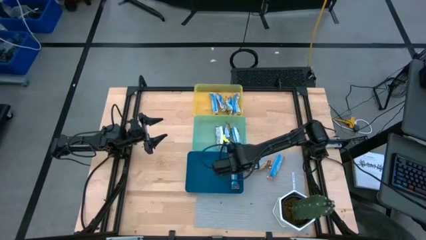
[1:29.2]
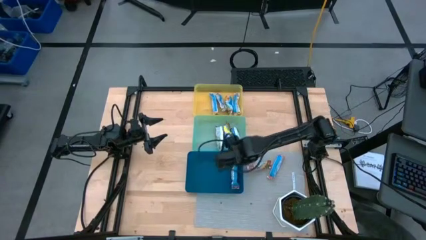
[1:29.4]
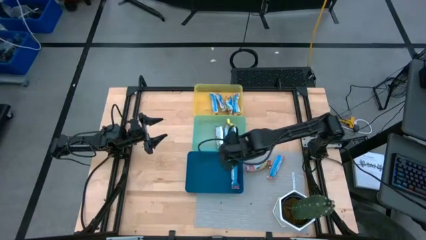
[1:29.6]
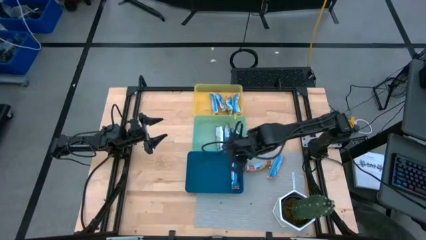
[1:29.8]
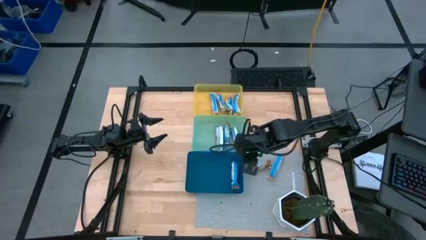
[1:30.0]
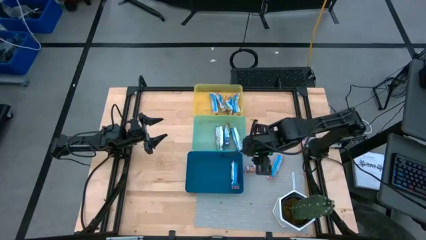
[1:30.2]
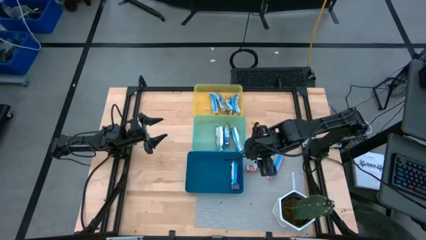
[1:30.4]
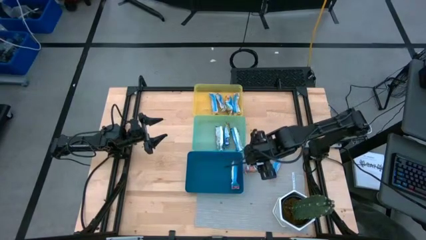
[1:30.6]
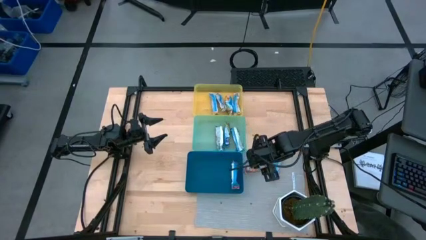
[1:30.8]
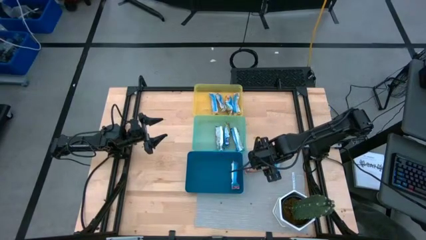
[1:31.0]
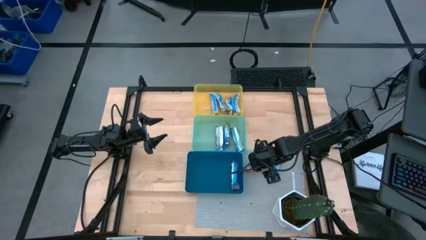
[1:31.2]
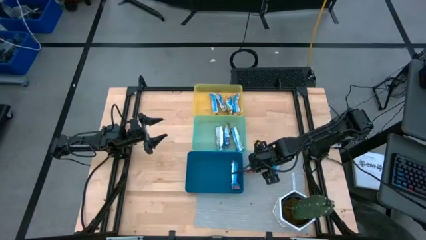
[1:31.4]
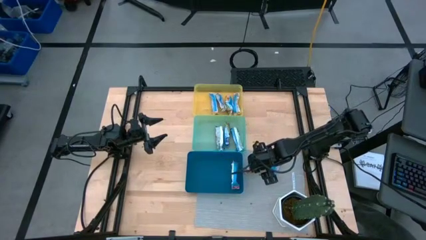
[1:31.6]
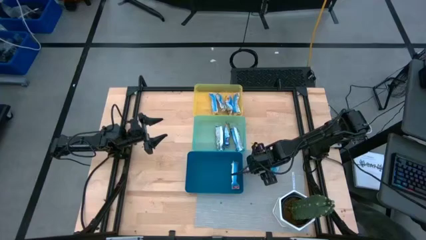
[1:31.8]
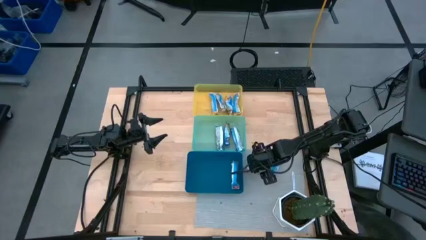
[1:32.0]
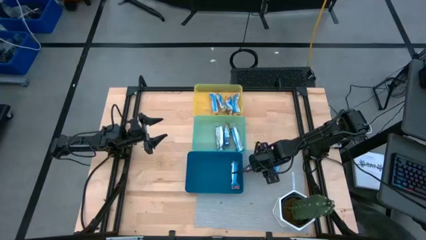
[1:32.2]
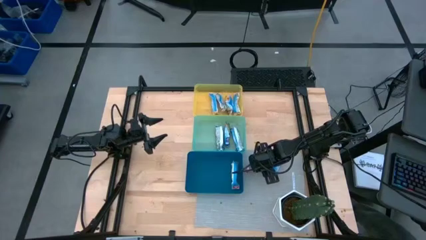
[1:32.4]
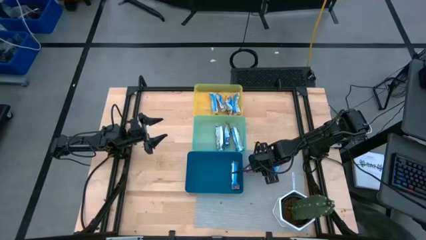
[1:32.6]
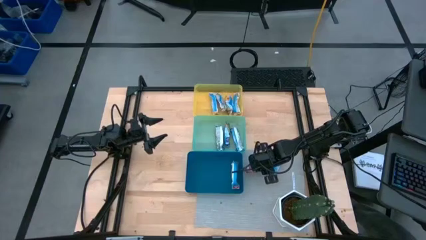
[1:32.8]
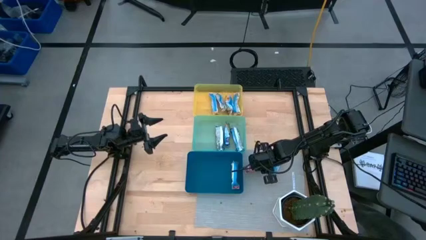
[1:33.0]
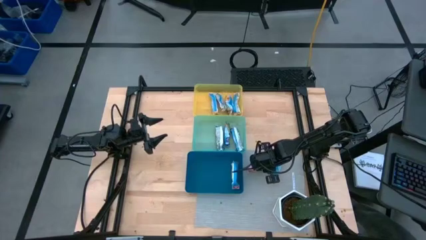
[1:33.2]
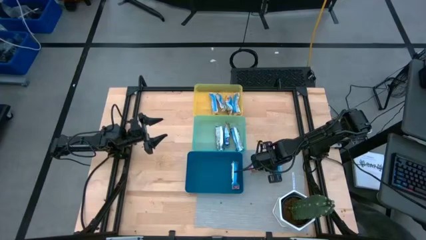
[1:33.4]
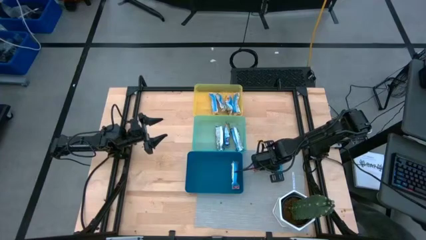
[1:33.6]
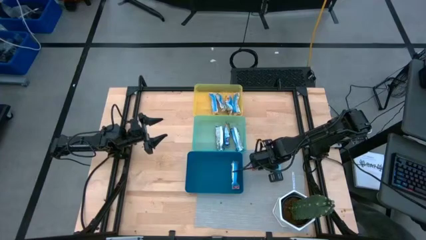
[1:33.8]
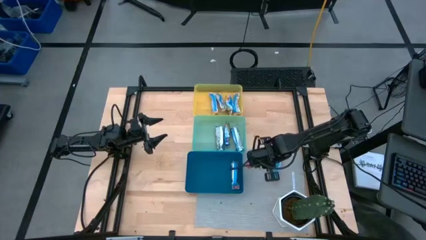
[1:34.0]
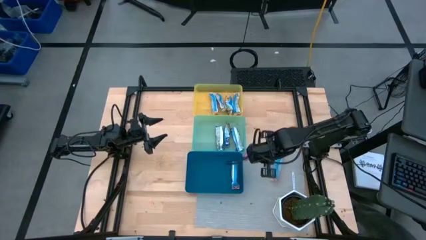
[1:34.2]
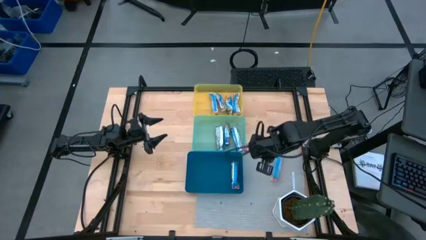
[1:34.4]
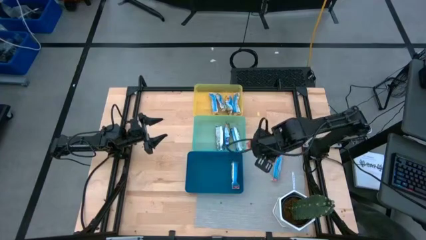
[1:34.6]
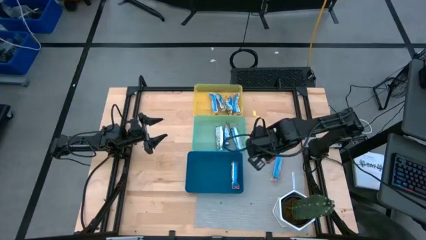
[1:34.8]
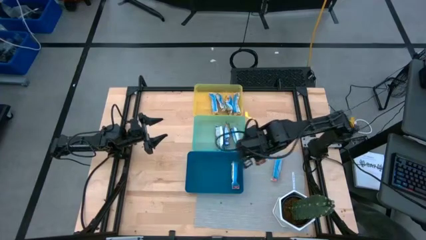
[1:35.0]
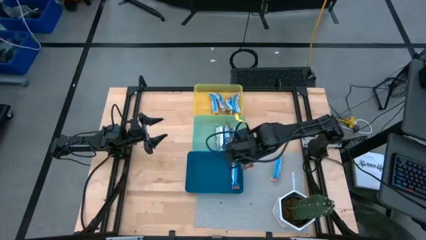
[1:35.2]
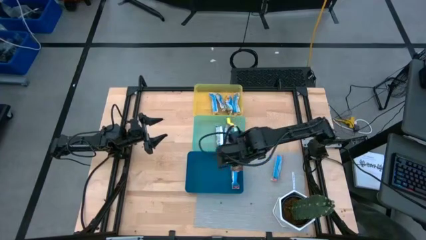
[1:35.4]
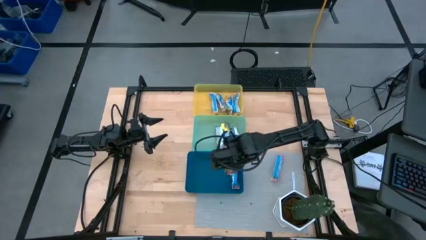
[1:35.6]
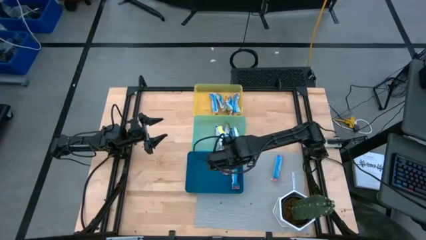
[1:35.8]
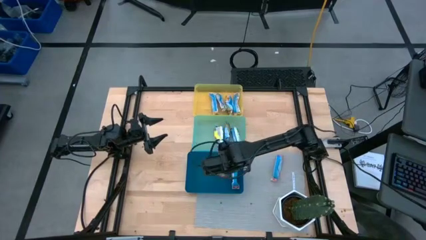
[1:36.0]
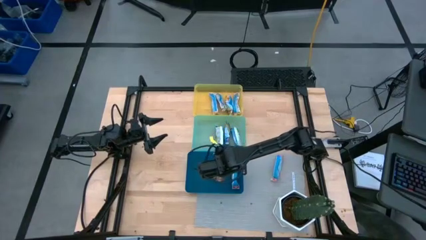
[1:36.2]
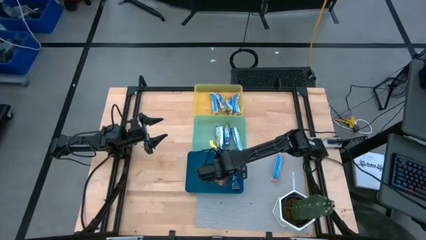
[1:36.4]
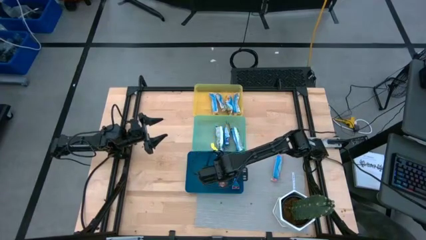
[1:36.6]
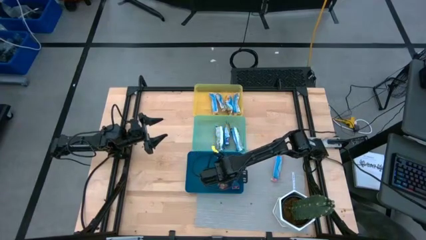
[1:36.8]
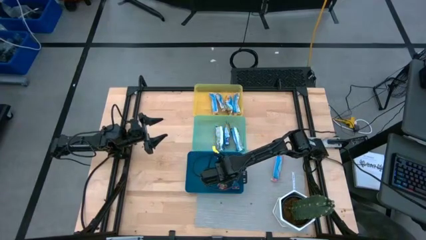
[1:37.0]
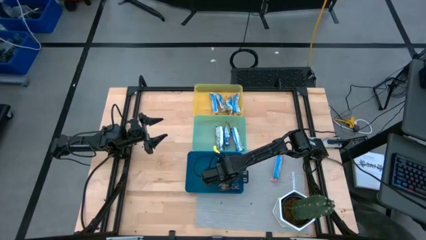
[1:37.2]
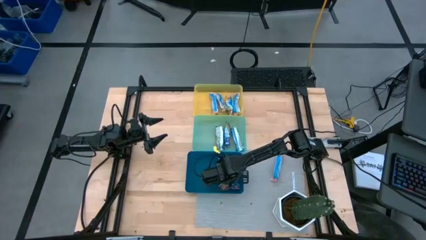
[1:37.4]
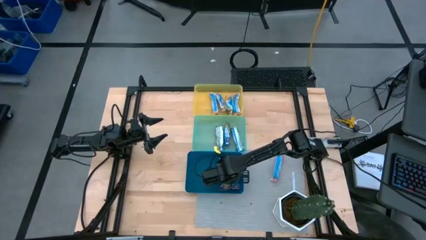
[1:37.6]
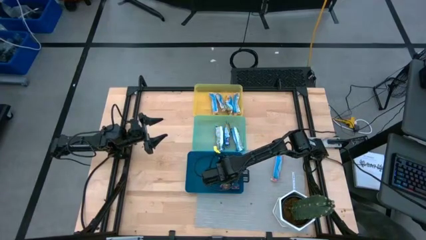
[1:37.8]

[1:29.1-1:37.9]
Task: Pick and place Granola Bars by type
Put the red granola bar into the blue bin

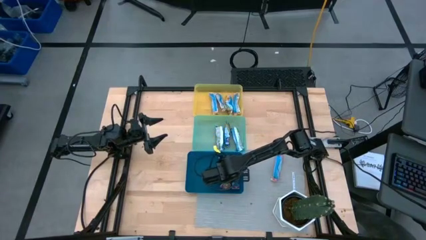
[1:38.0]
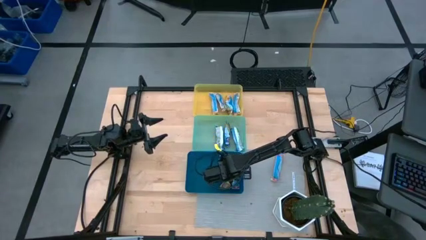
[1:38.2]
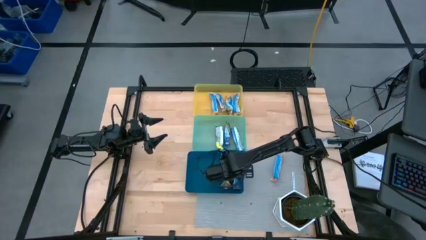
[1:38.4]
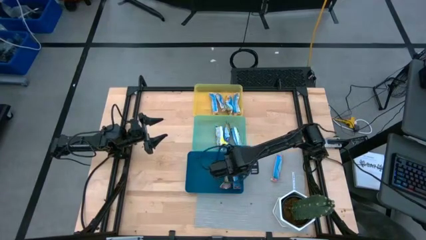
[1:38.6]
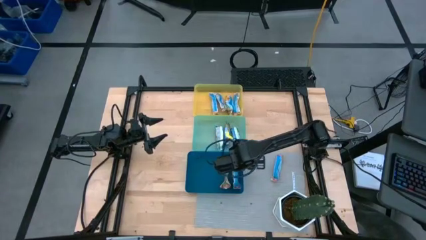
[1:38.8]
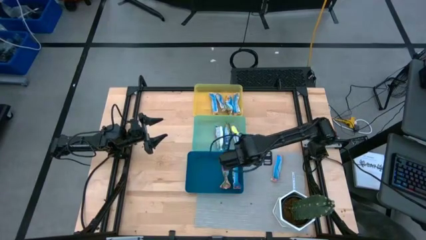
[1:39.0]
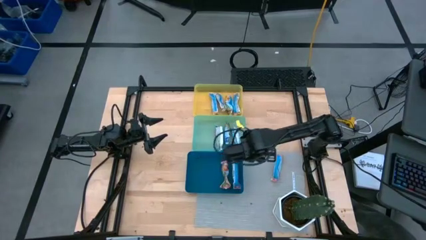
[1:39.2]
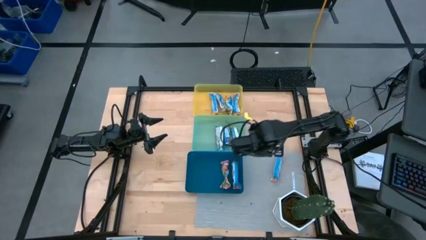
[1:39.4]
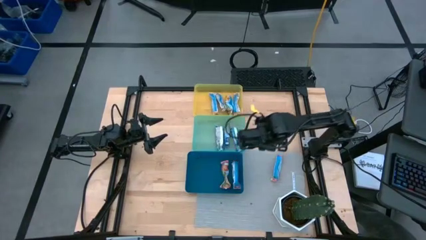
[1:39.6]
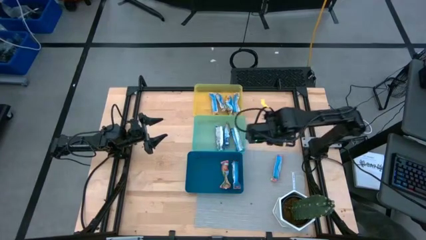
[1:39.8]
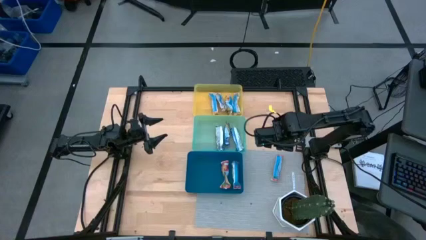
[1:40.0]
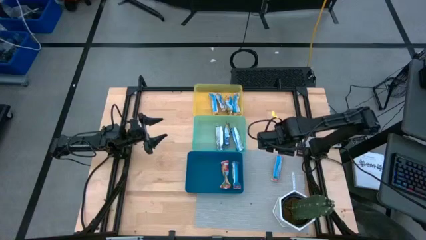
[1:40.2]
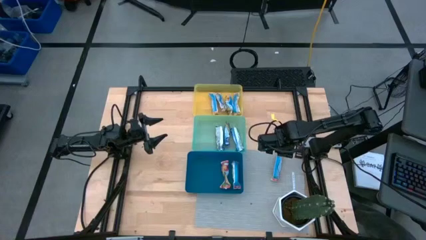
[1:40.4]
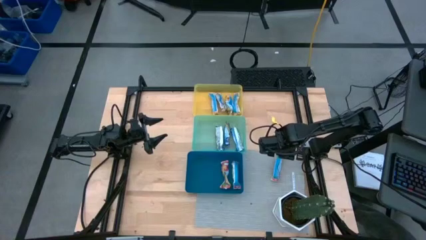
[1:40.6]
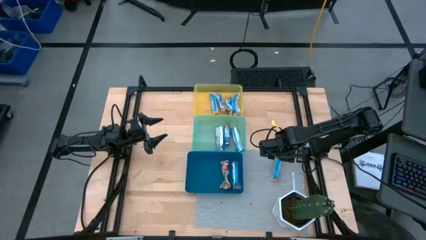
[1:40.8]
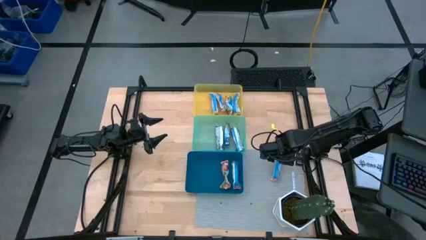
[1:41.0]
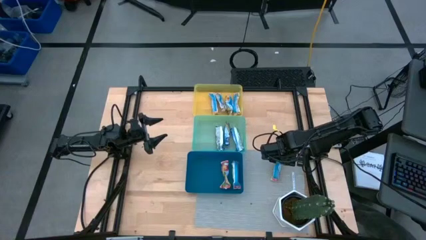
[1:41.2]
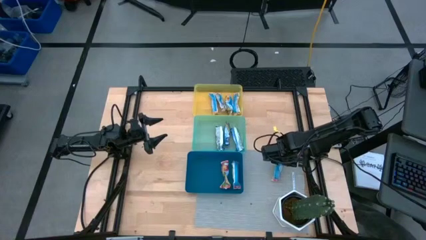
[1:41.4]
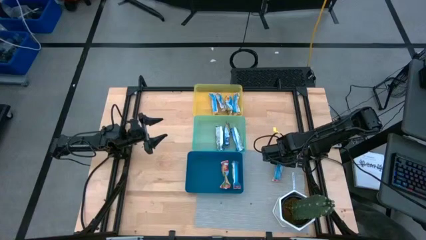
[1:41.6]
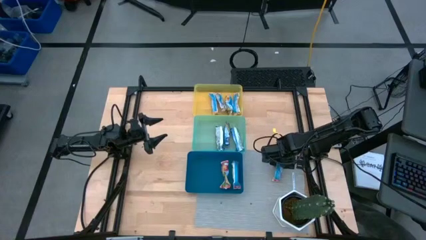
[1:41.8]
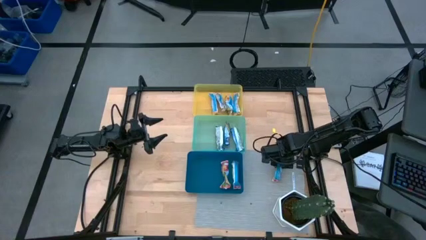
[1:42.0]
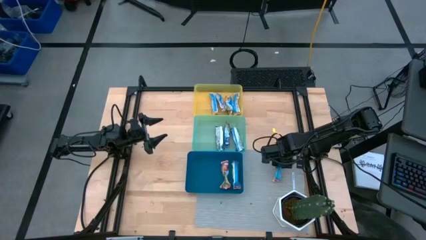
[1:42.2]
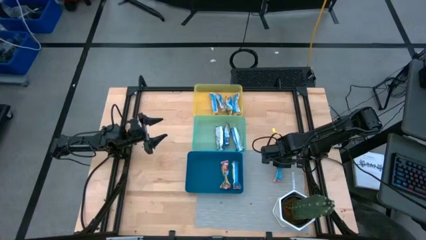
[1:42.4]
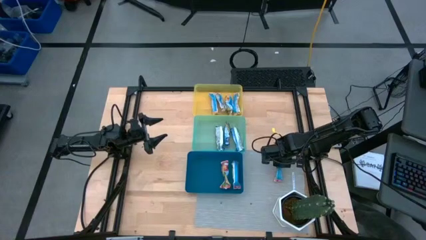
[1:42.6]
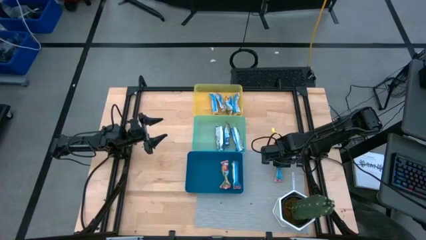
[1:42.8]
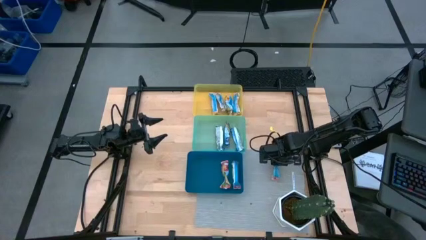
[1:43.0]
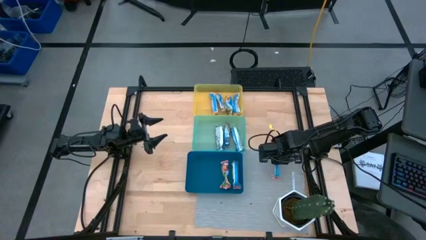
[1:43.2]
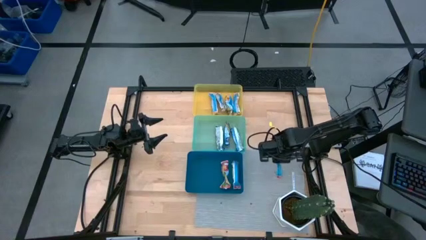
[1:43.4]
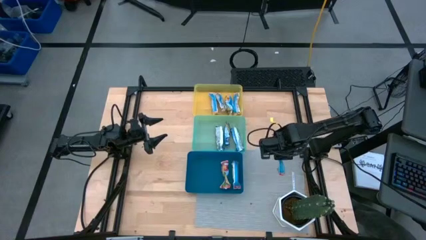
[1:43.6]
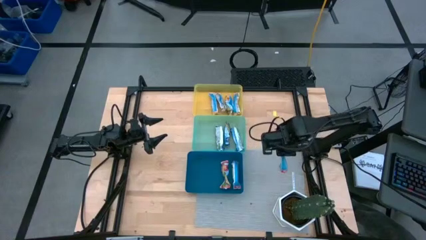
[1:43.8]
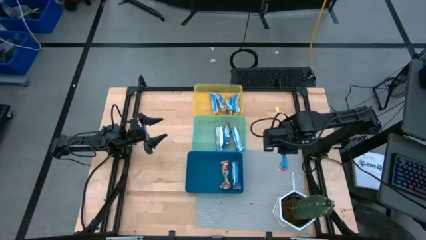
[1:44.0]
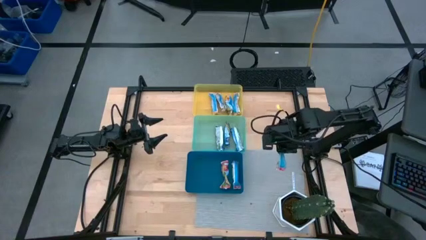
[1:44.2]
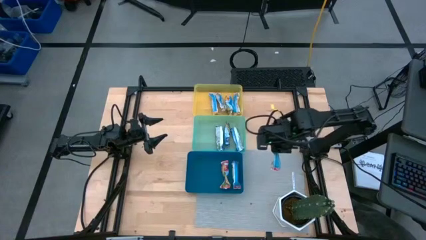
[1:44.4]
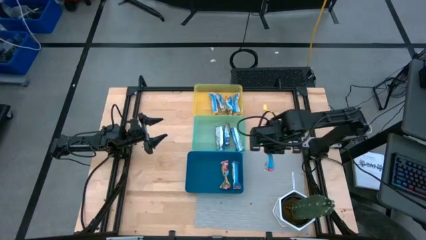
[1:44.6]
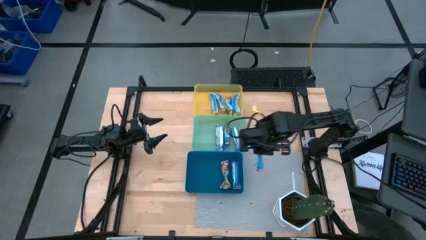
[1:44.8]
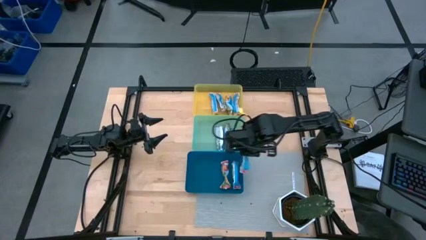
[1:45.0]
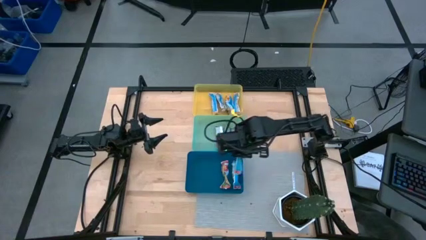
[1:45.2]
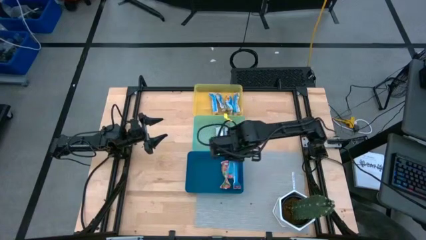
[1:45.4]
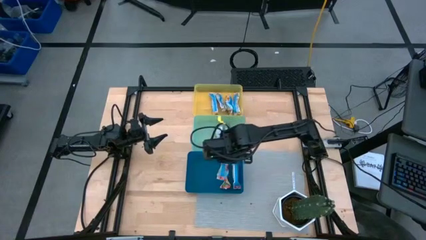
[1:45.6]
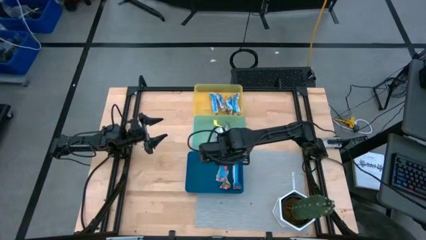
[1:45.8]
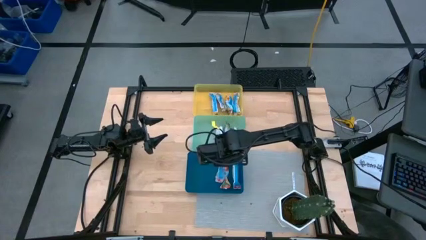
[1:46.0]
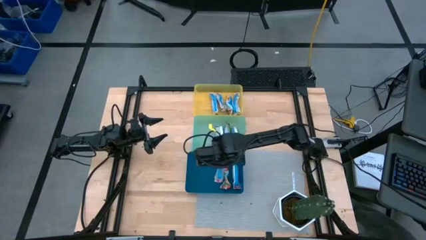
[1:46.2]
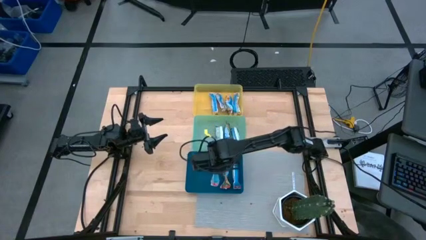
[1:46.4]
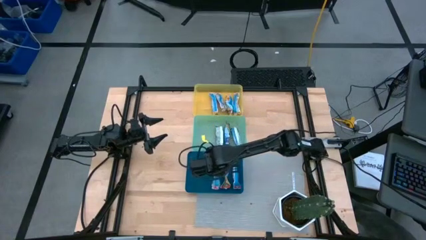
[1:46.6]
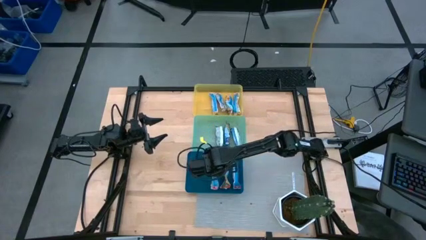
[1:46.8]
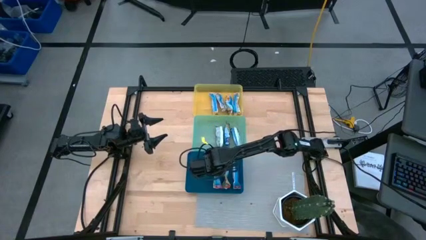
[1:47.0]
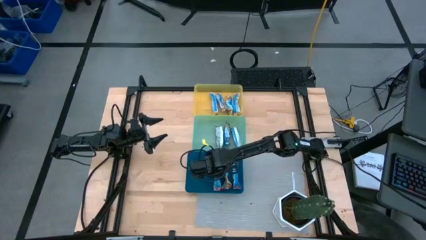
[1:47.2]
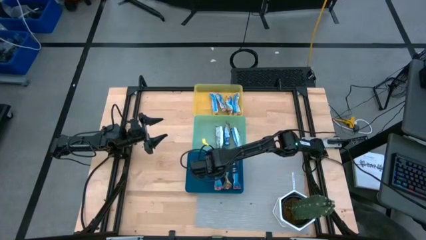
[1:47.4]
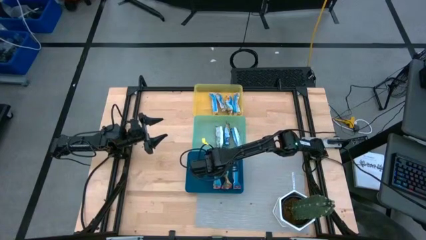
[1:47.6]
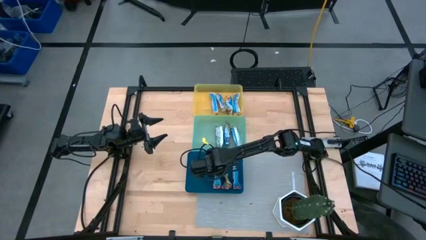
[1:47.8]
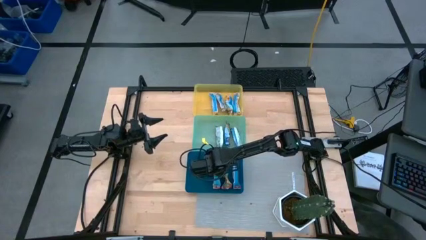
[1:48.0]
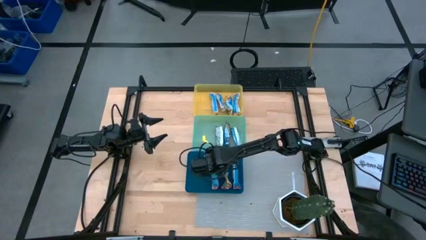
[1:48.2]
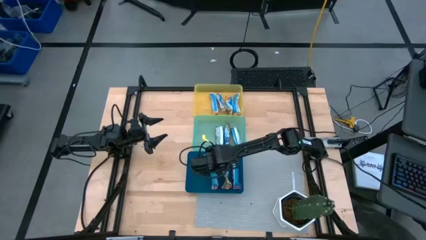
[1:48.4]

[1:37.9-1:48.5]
Put the red granola bar into the blue bin
